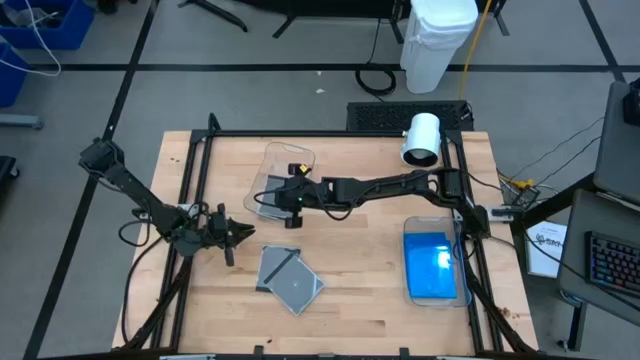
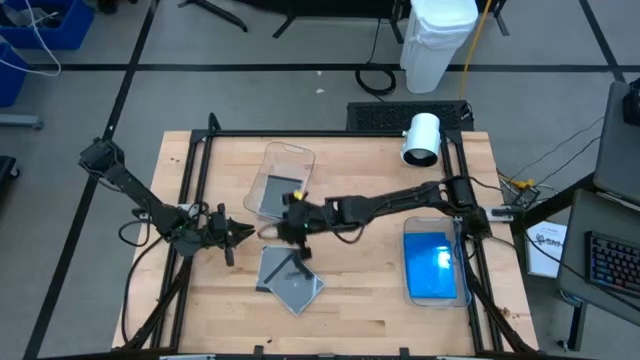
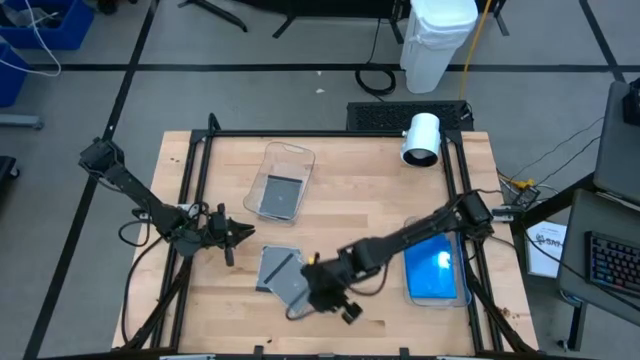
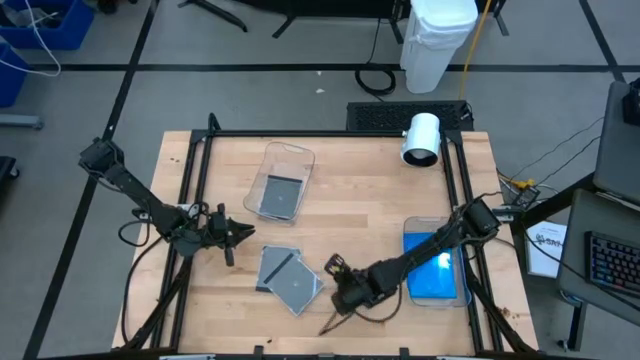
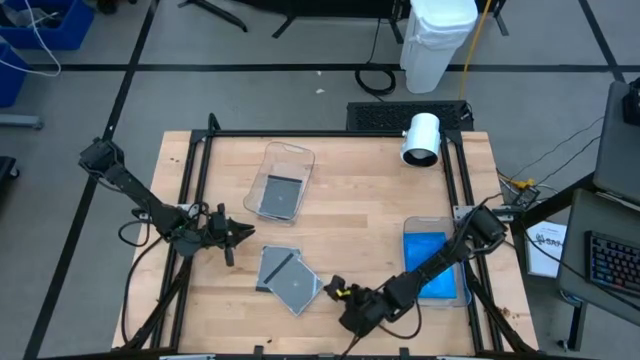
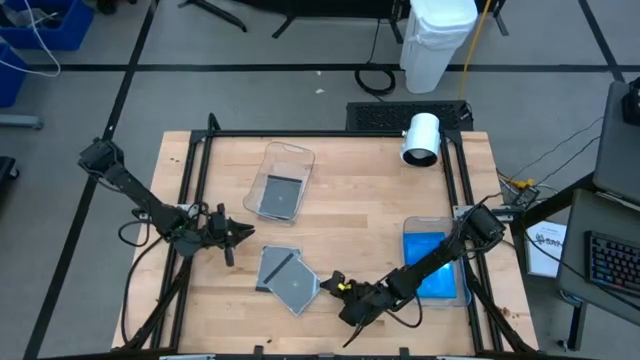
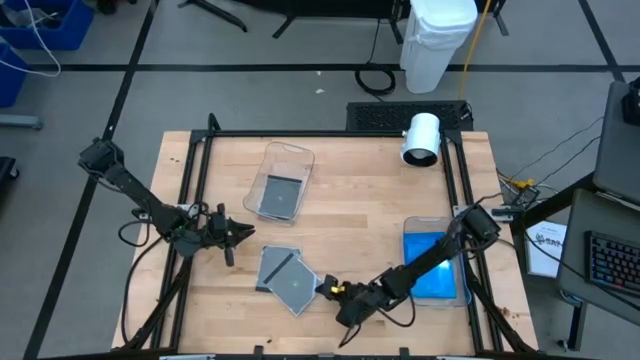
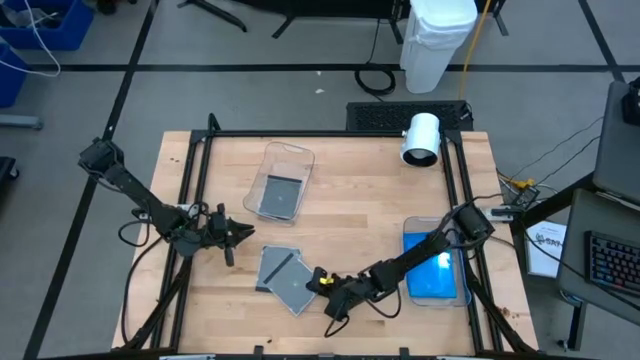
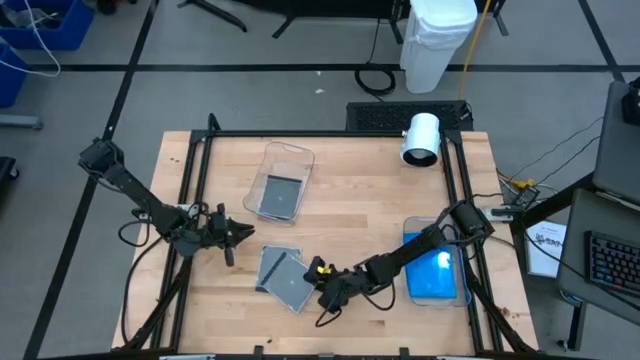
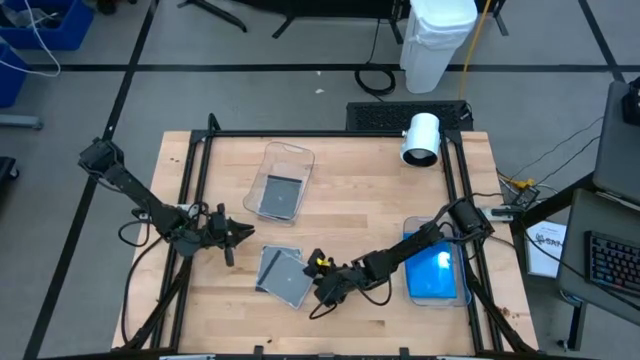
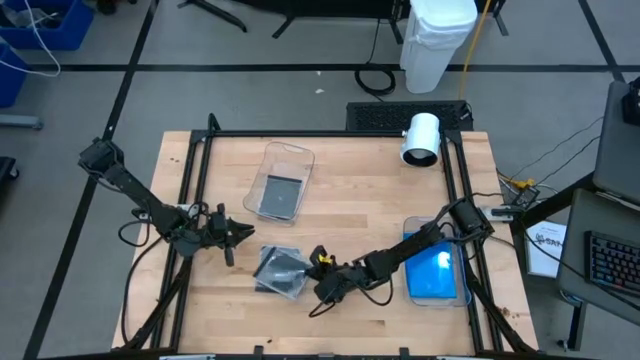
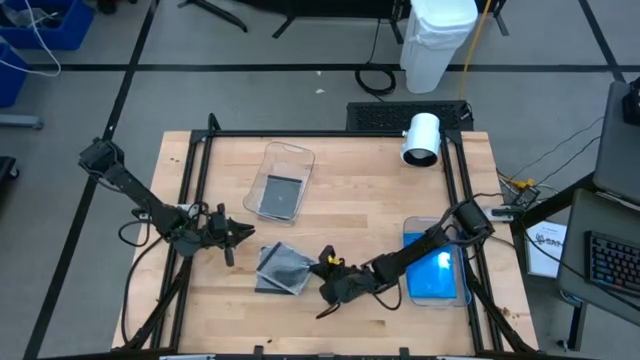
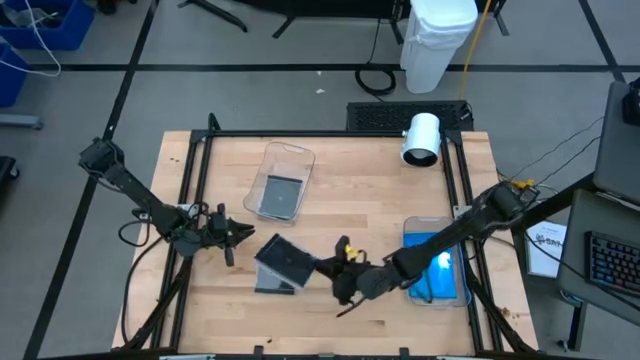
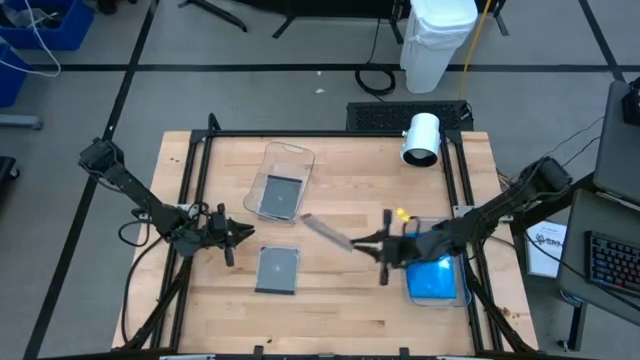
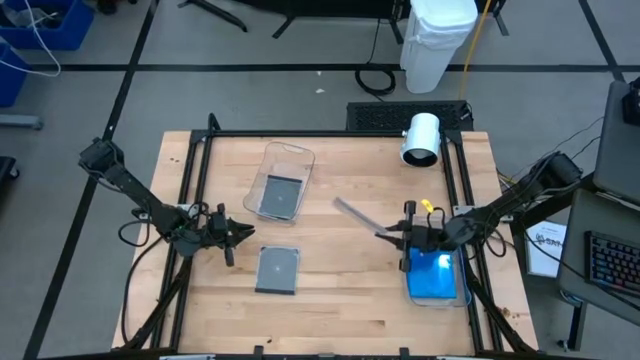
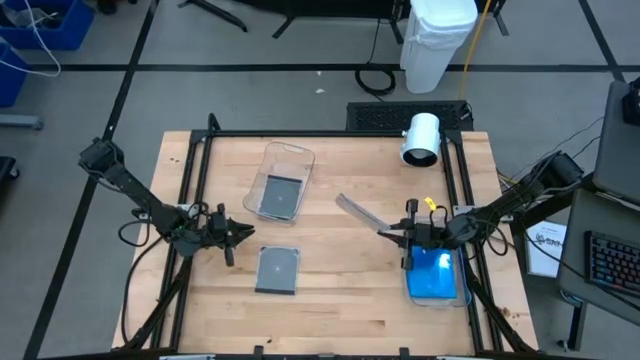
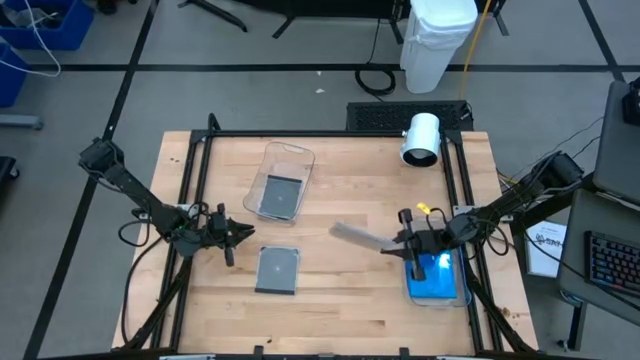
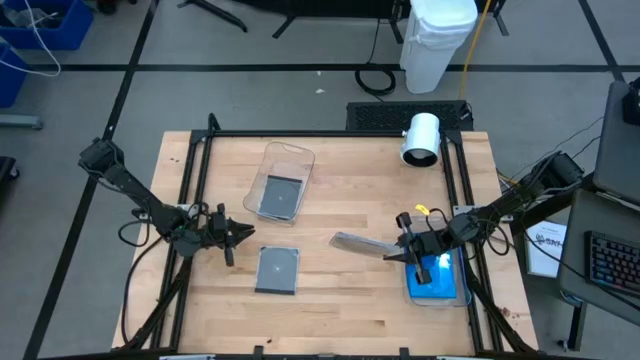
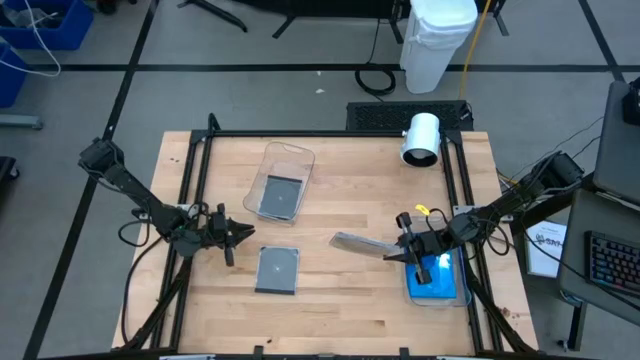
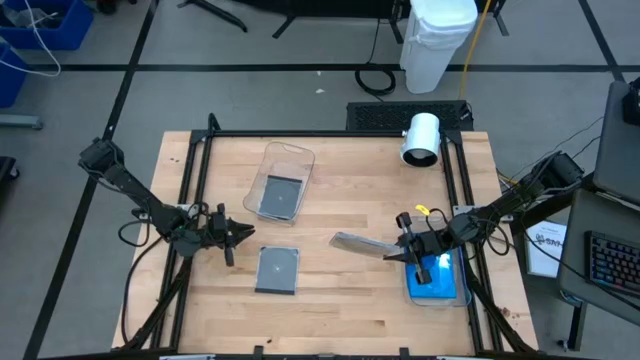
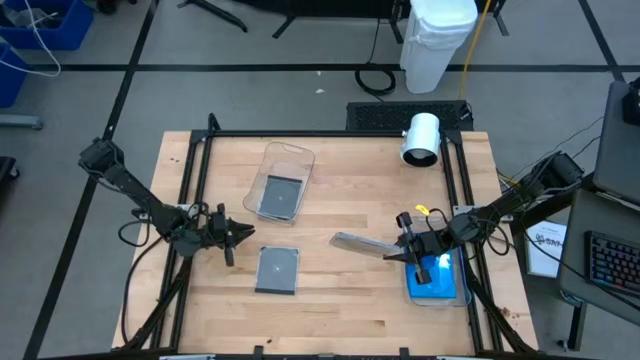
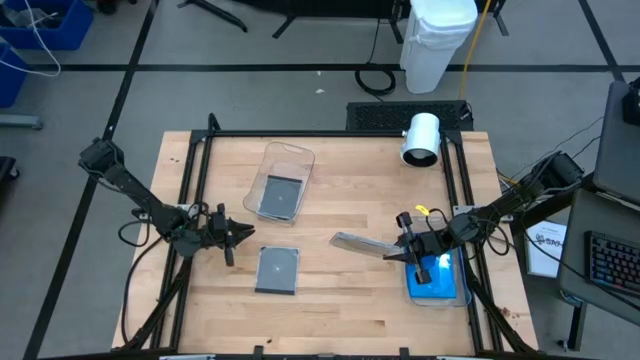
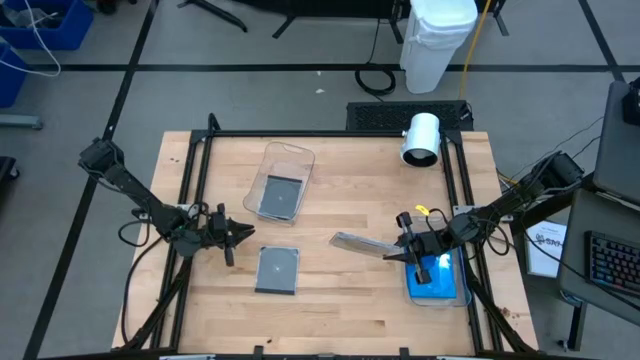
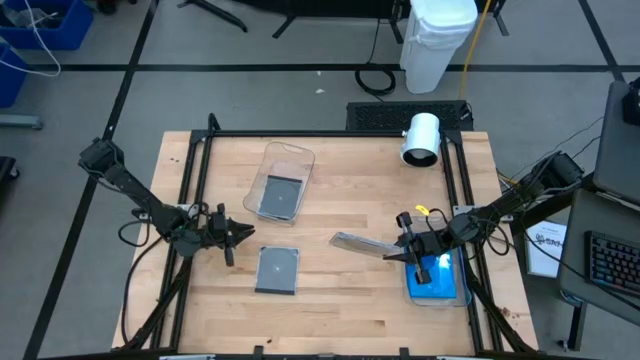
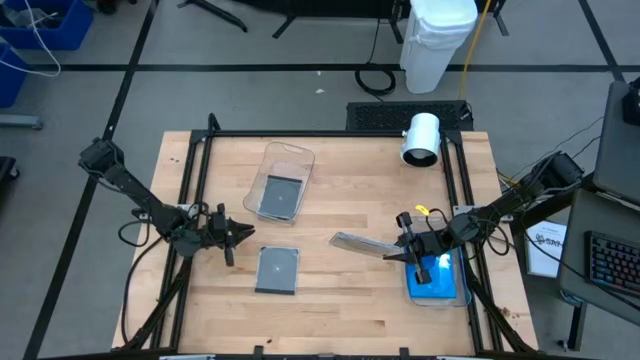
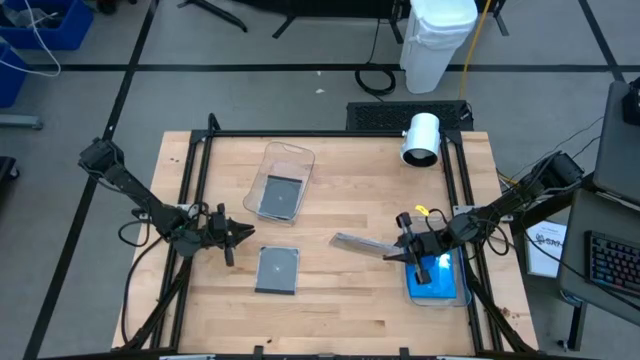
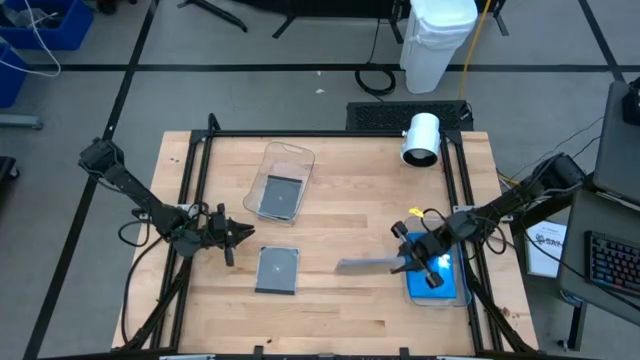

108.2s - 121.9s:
Task: Pick & place jewel cases by type
Put the bottom black disc case into the left transparent bin

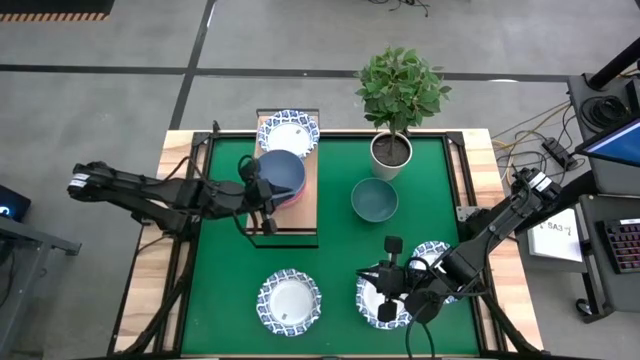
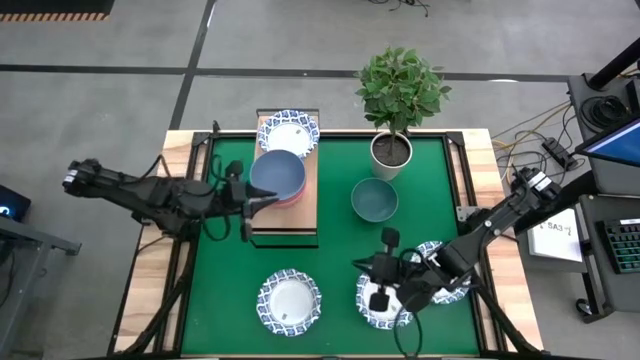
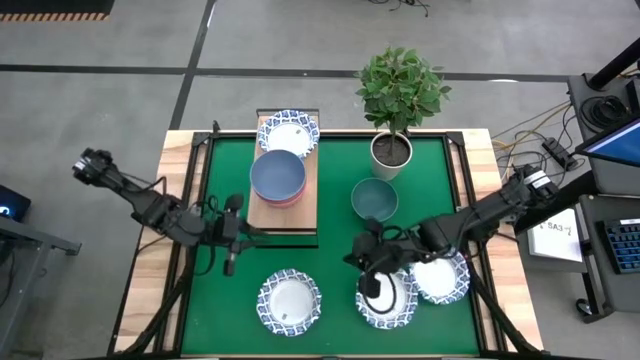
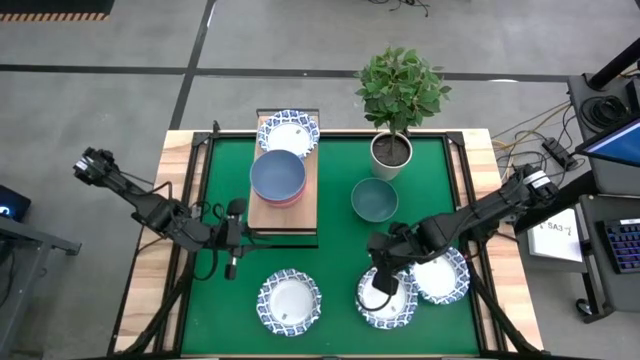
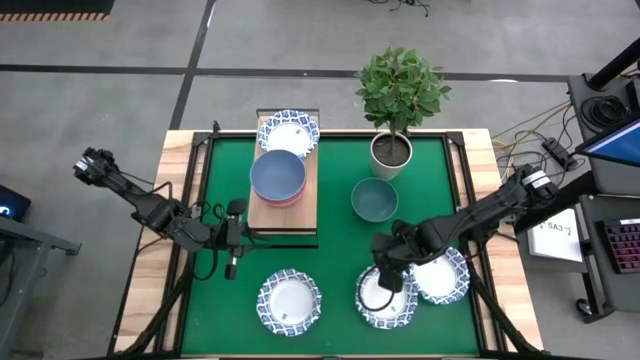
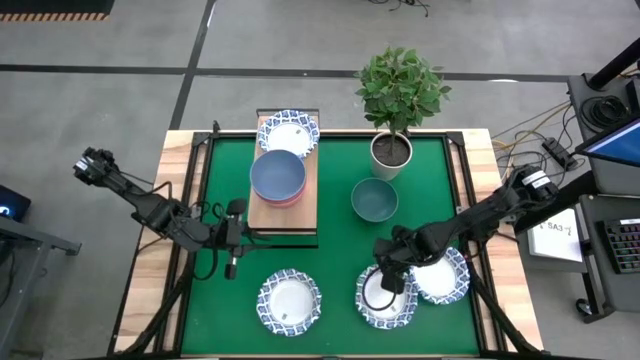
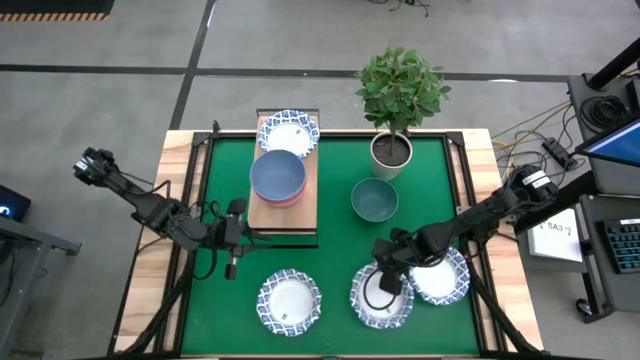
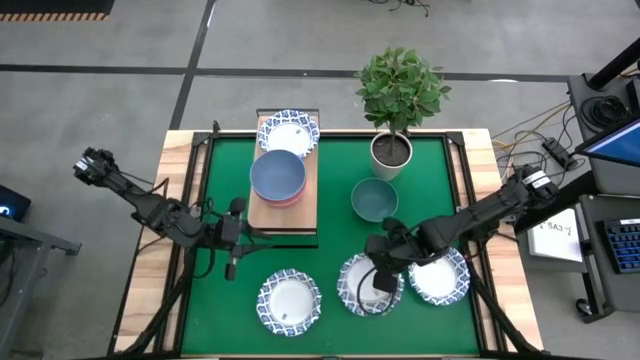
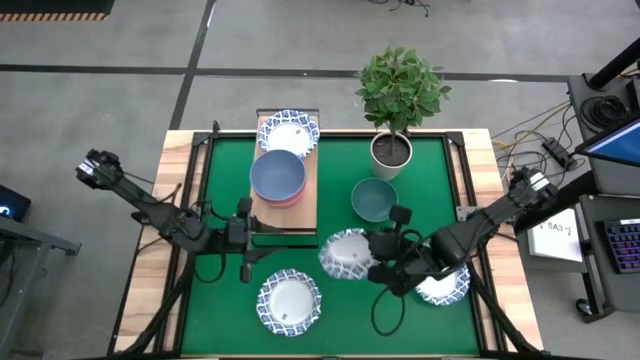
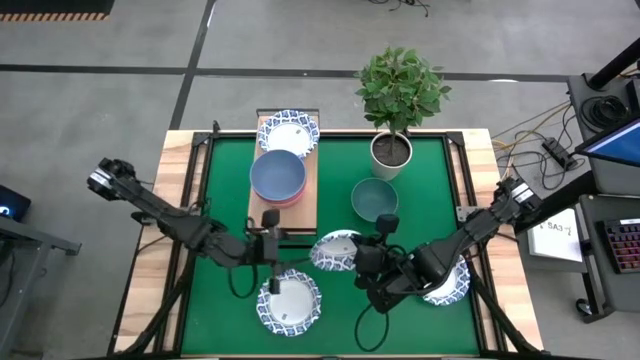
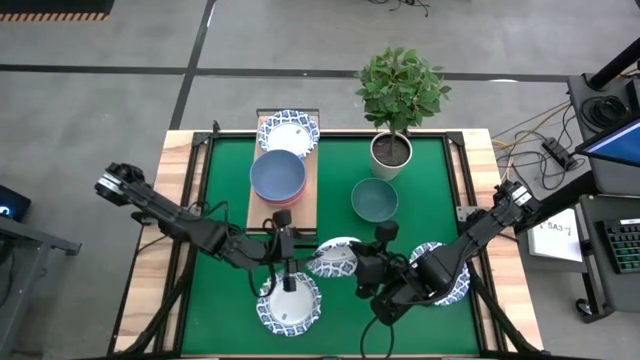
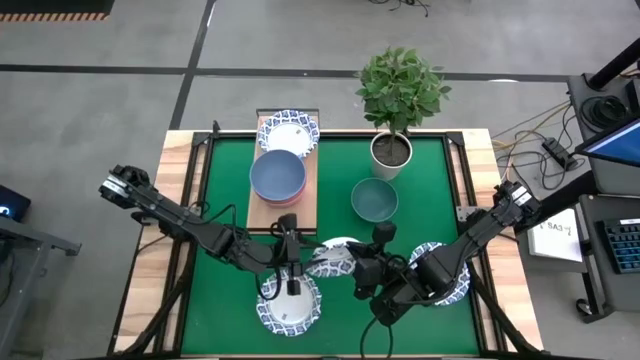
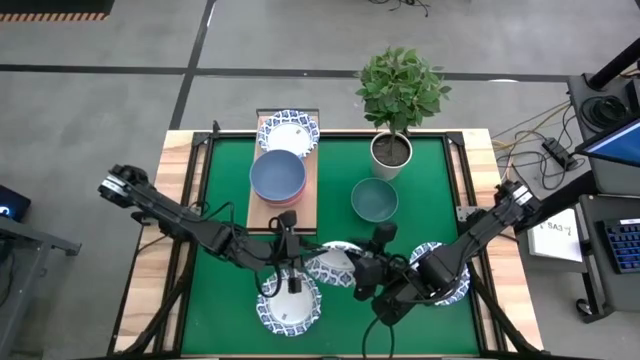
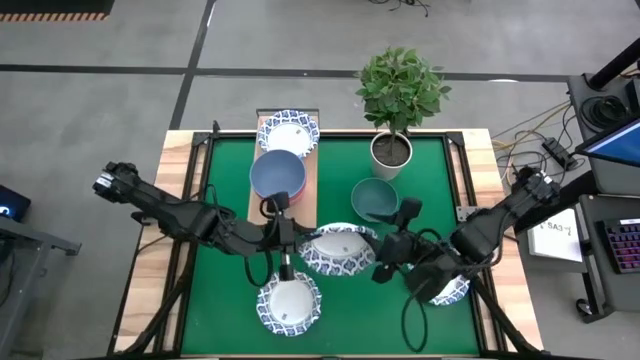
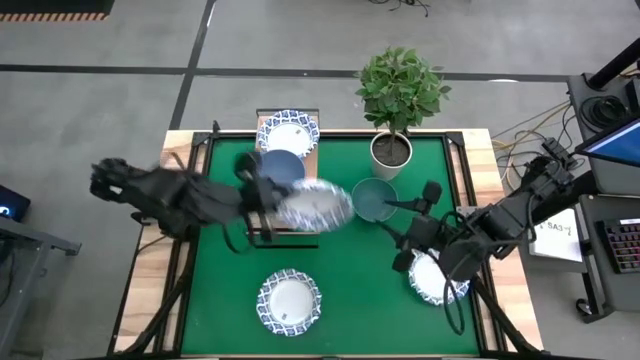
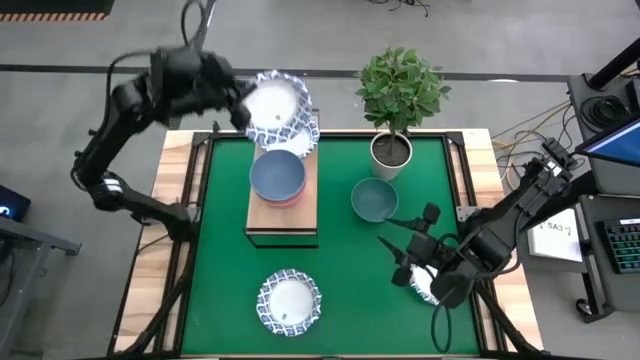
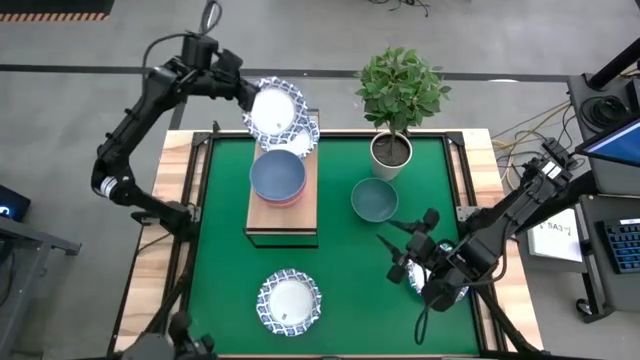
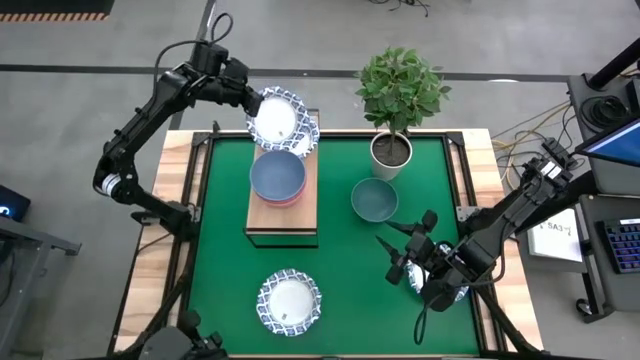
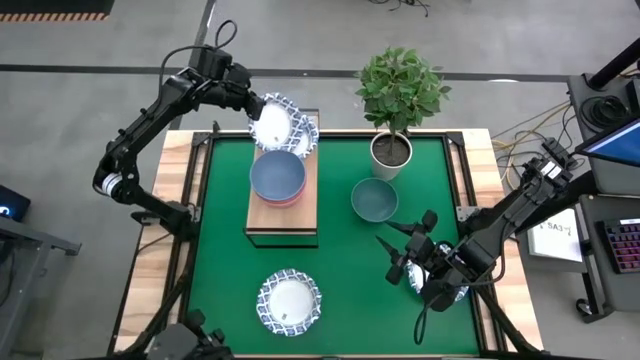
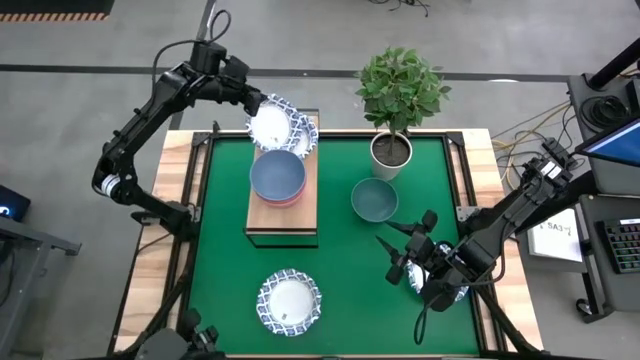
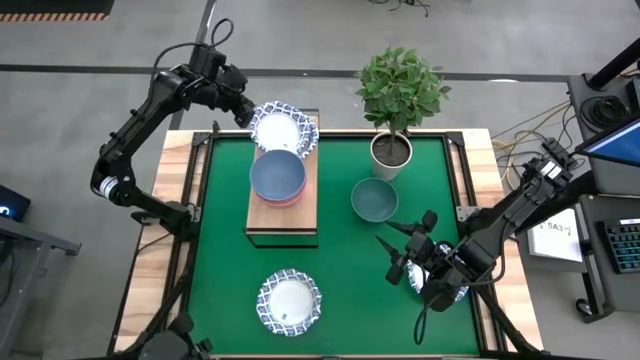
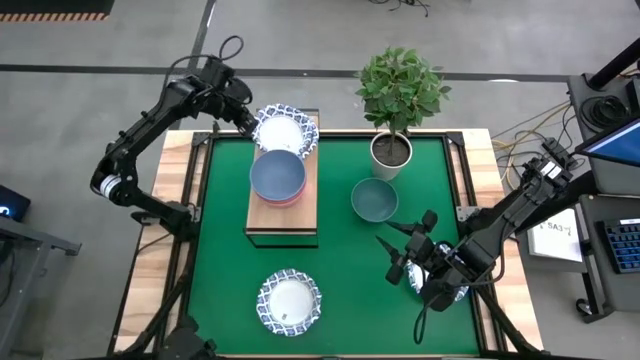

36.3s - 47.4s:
Task: Place and stack bowls onto a shelf
Stack the white patterned bowl on top of the white patterned bowl on the shelf
